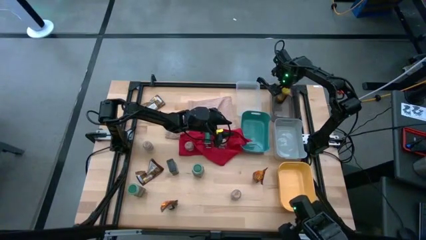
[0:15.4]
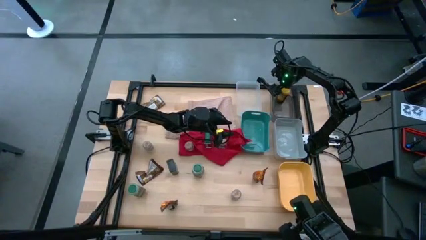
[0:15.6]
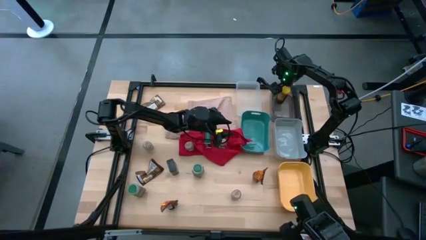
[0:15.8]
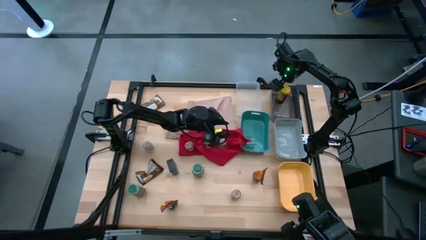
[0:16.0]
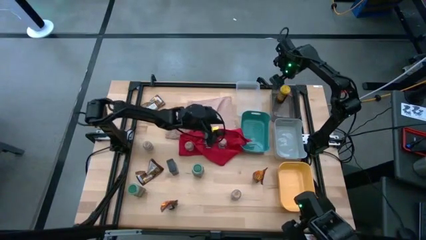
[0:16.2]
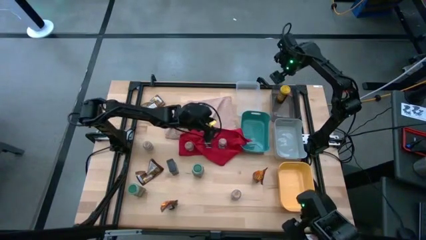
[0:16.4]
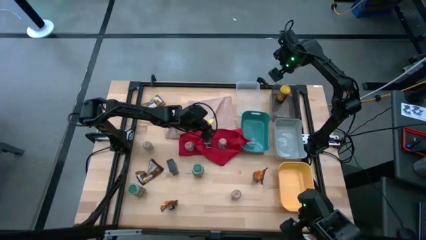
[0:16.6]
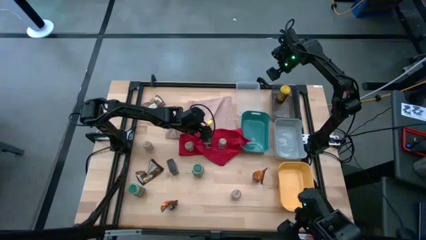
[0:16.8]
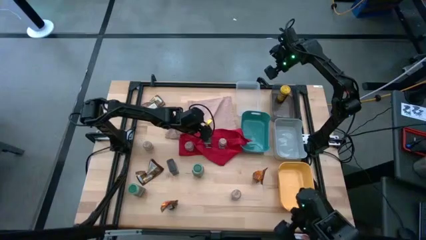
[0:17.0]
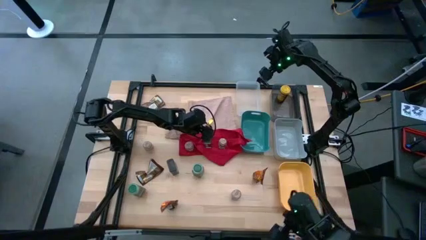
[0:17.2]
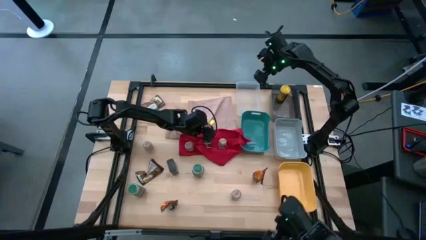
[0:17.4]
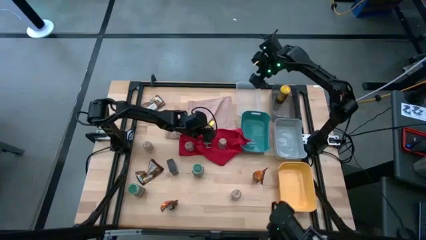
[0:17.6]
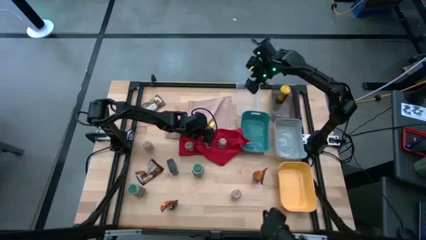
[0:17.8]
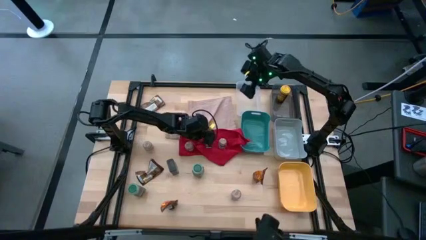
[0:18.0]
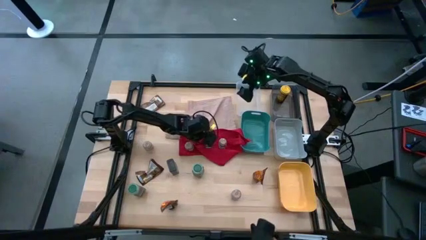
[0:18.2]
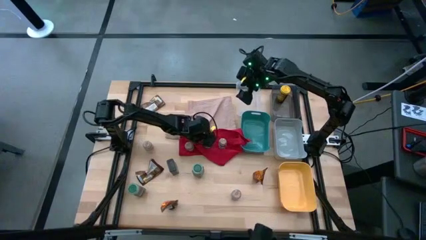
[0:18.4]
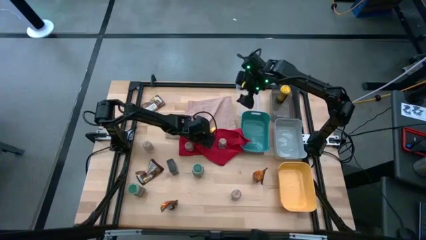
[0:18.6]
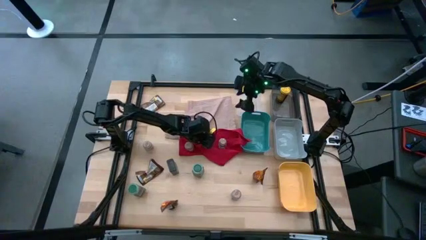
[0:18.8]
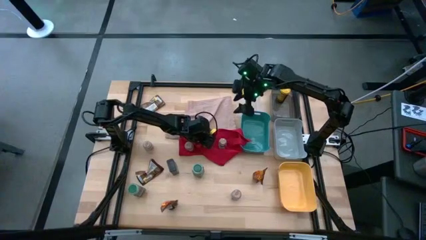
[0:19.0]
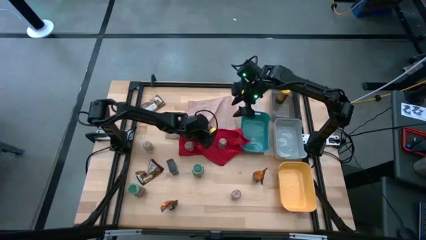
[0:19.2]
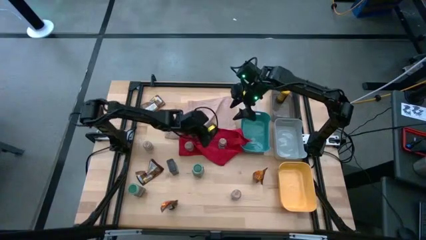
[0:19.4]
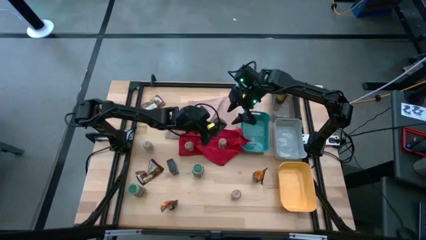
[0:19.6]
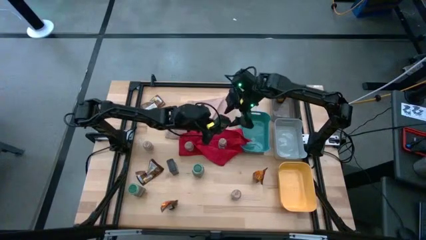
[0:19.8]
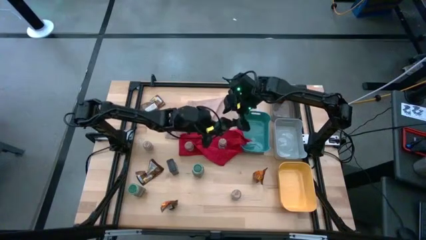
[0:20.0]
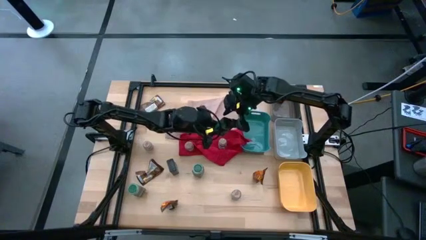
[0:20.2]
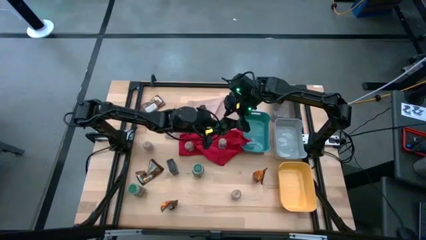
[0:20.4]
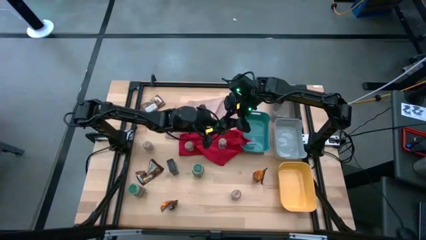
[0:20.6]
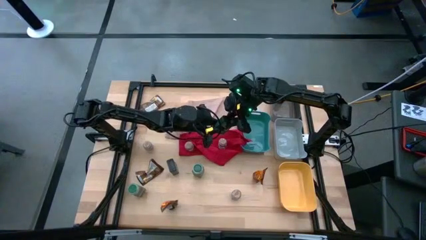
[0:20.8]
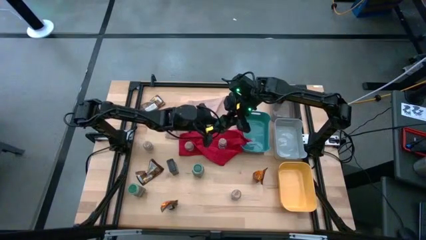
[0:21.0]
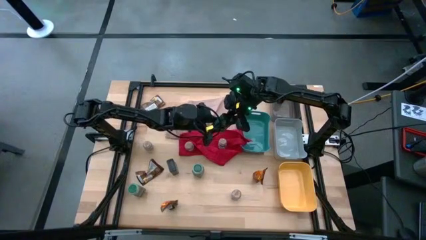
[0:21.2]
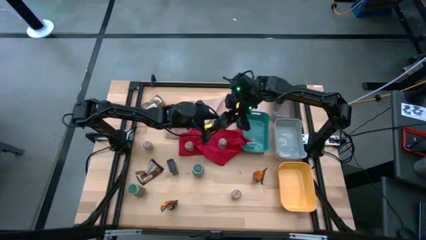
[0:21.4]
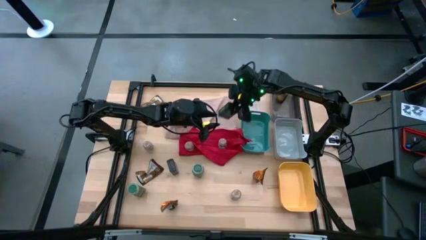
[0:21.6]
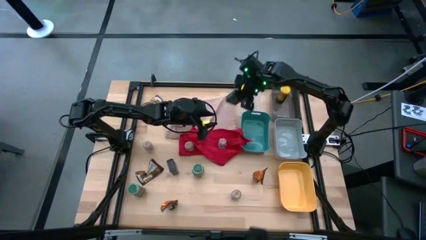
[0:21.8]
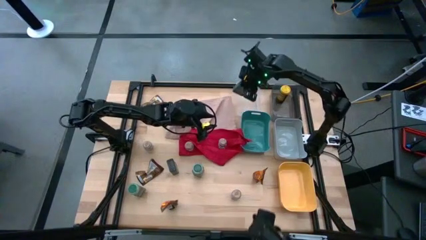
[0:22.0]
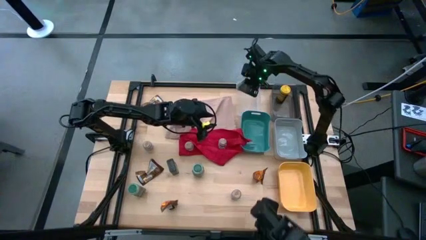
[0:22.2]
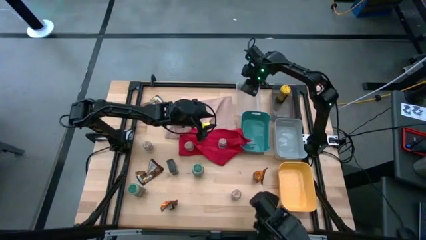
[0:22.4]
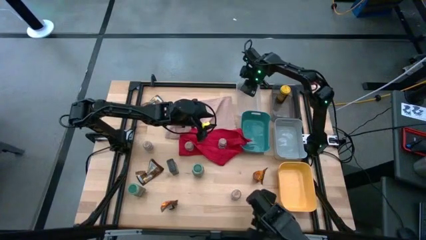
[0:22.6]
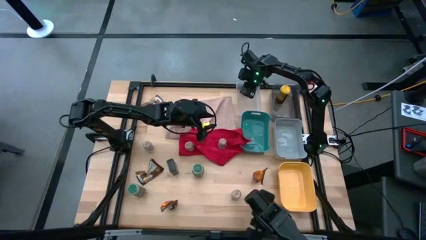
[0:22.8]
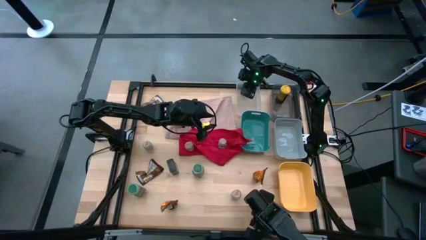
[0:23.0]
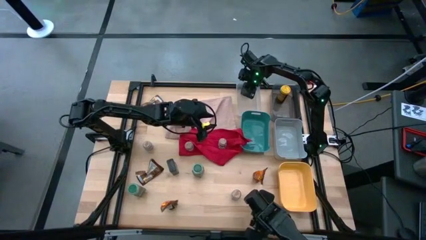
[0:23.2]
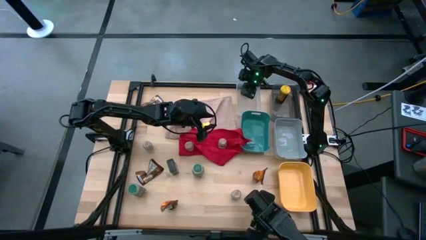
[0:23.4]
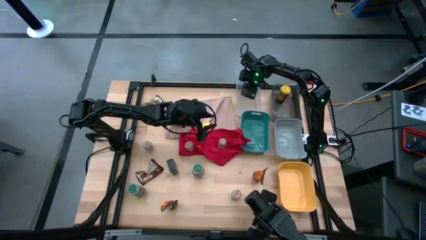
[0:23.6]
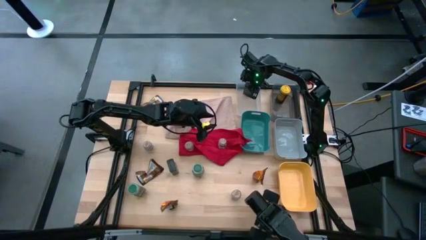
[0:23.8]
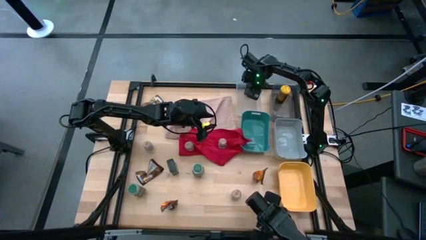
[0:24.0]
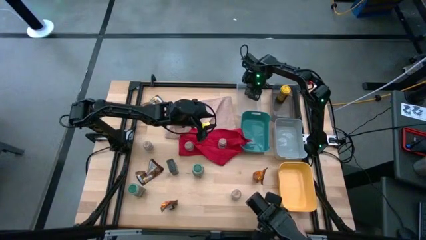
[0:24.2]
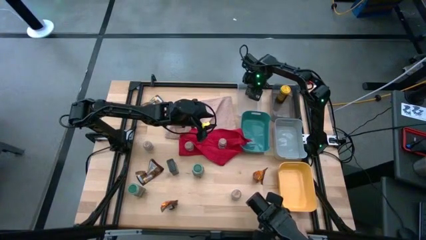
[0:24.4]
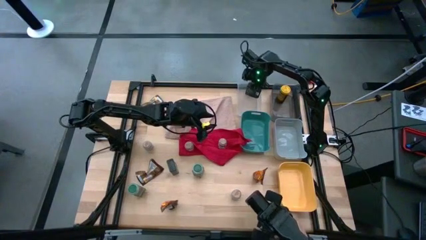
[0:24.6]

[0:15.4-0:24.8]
Task: Sort spices by type
Put the top dark green seasoning can into the transparent bin

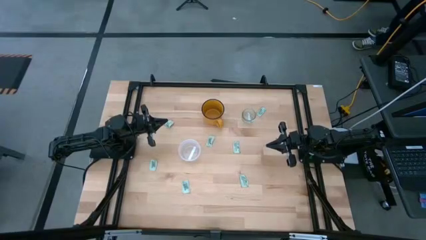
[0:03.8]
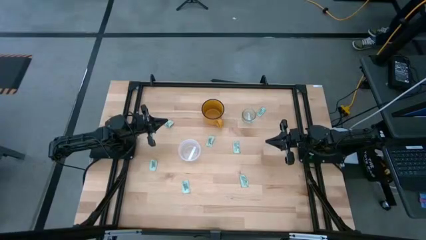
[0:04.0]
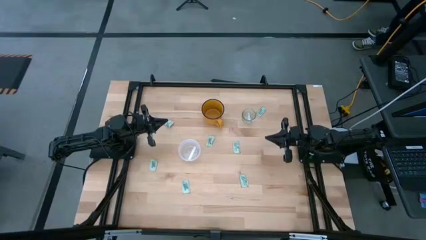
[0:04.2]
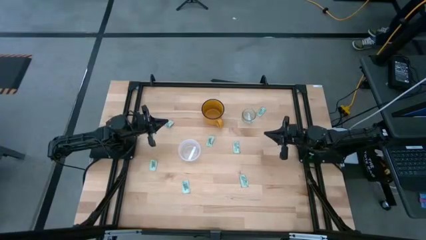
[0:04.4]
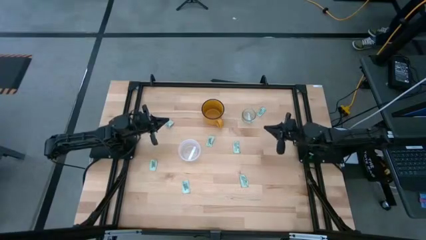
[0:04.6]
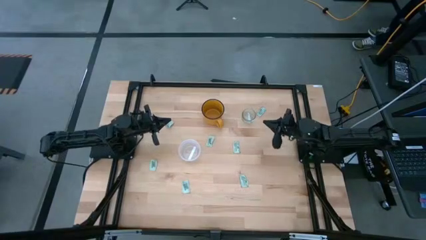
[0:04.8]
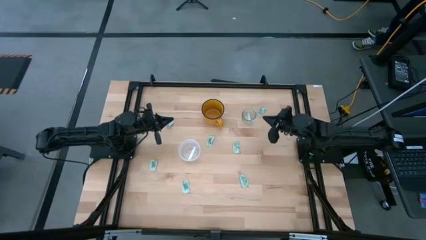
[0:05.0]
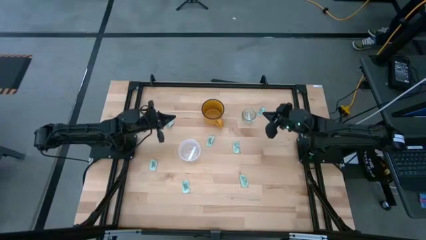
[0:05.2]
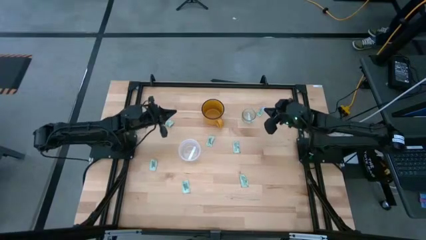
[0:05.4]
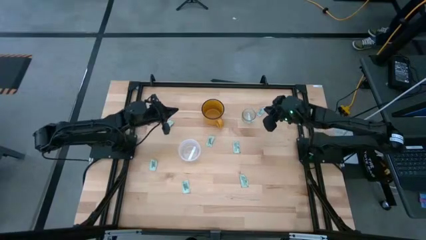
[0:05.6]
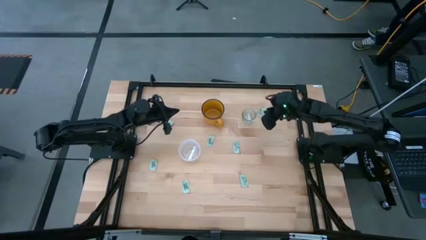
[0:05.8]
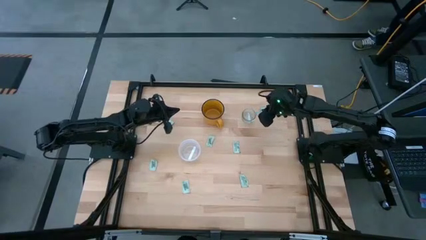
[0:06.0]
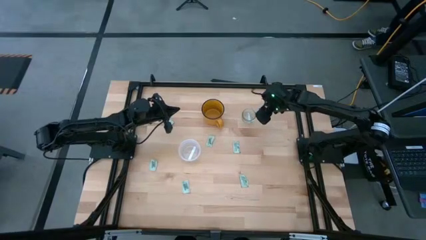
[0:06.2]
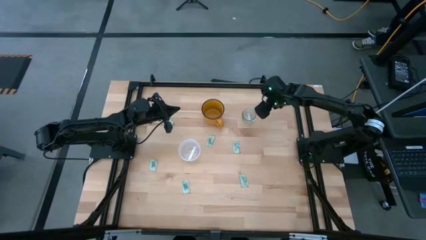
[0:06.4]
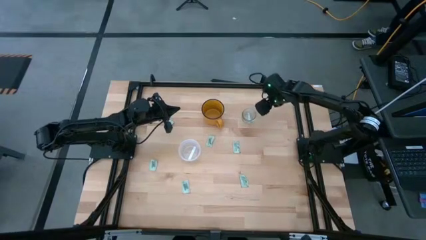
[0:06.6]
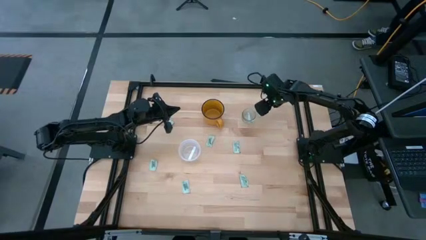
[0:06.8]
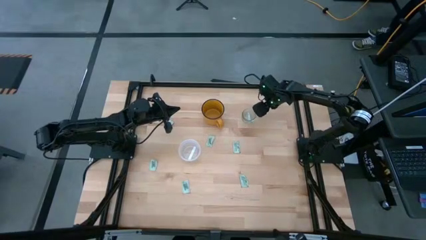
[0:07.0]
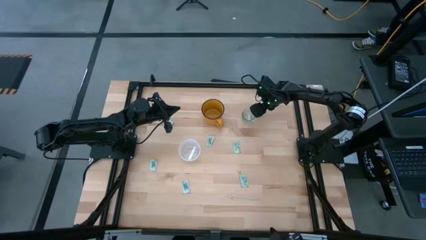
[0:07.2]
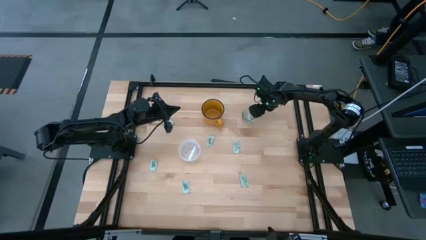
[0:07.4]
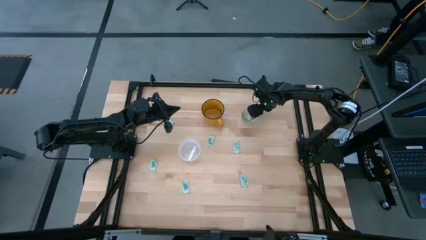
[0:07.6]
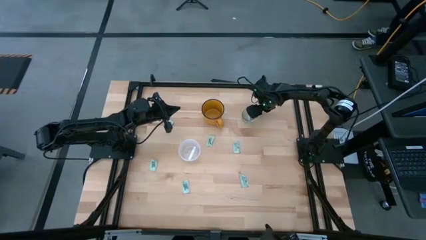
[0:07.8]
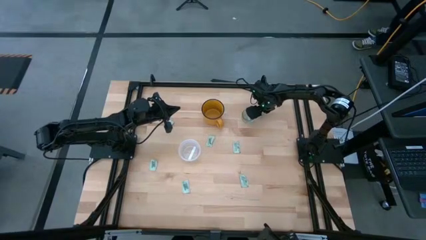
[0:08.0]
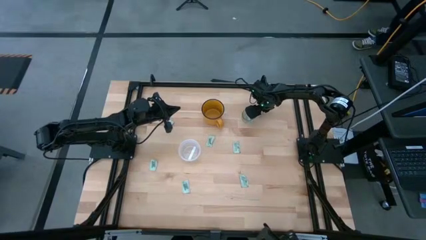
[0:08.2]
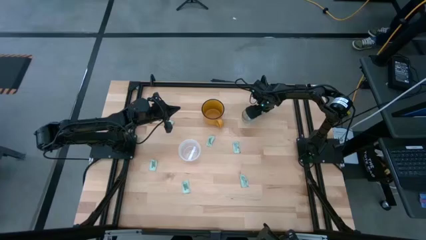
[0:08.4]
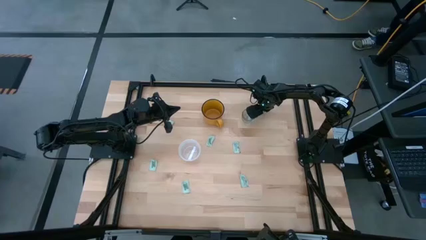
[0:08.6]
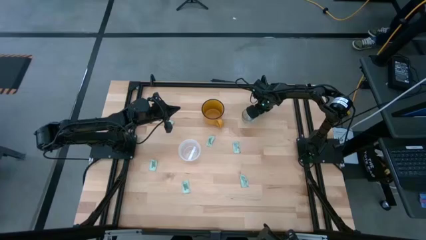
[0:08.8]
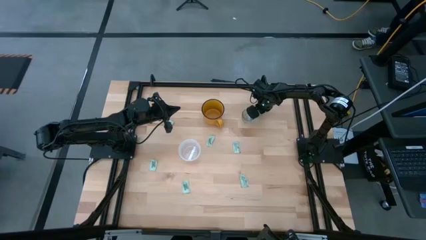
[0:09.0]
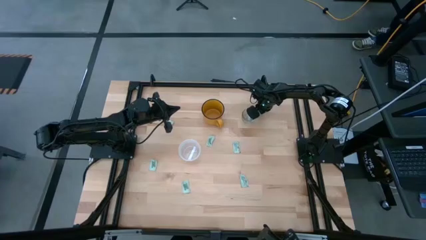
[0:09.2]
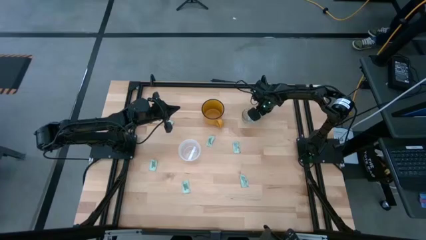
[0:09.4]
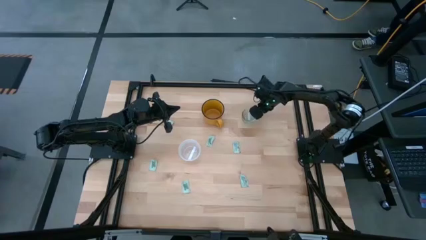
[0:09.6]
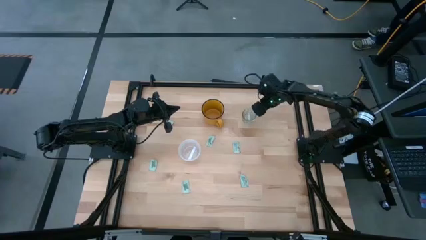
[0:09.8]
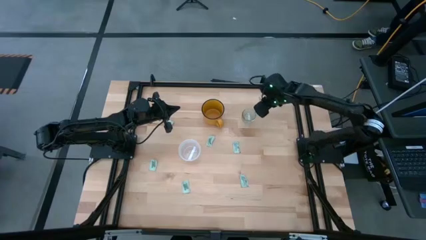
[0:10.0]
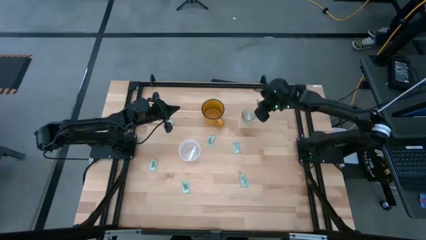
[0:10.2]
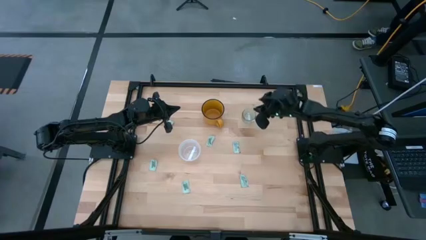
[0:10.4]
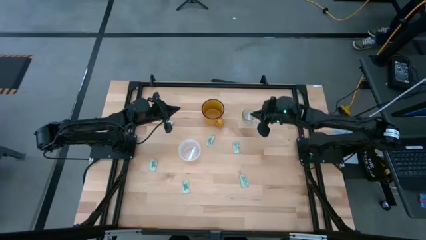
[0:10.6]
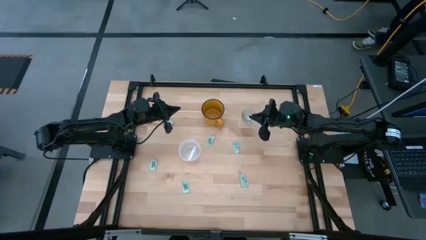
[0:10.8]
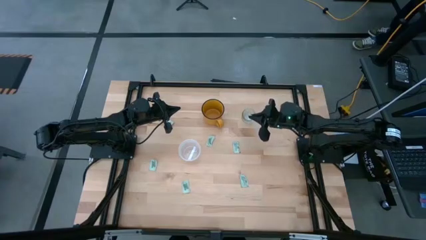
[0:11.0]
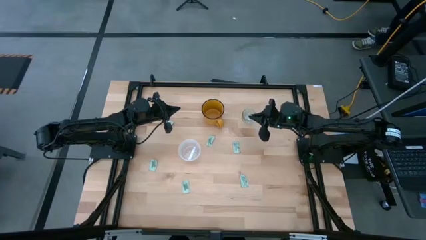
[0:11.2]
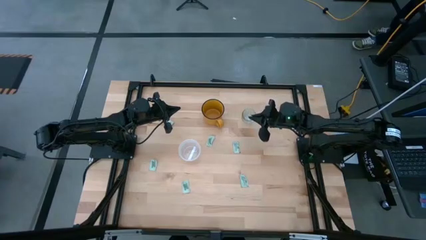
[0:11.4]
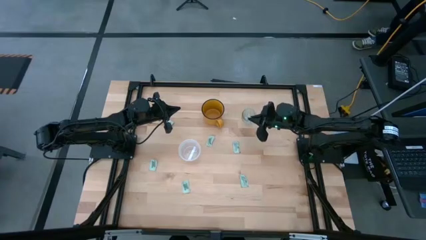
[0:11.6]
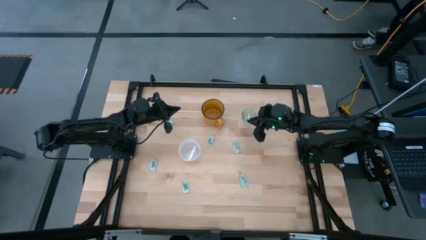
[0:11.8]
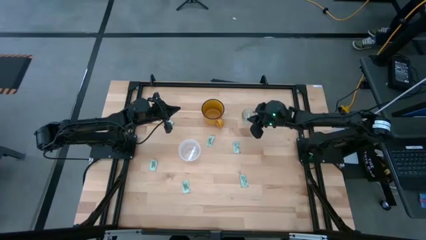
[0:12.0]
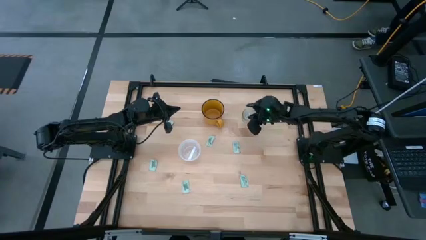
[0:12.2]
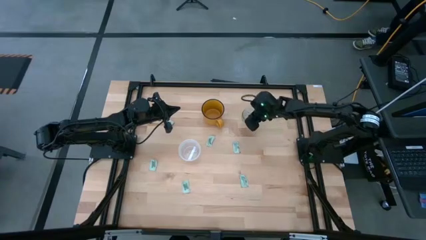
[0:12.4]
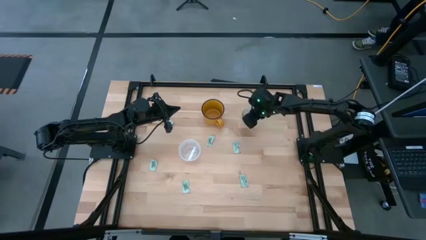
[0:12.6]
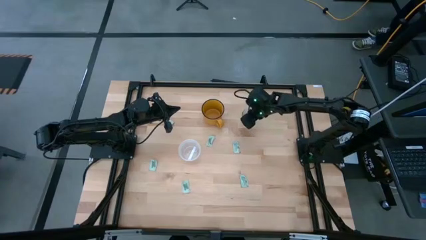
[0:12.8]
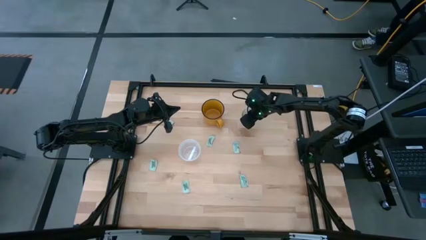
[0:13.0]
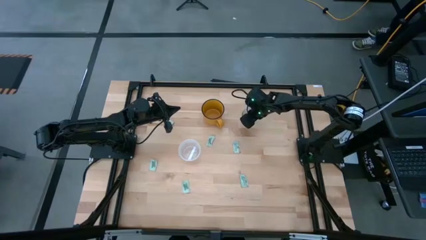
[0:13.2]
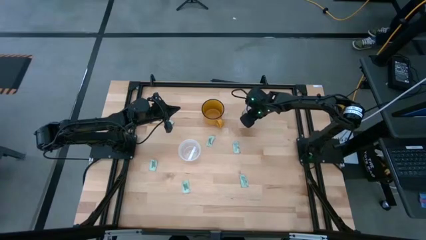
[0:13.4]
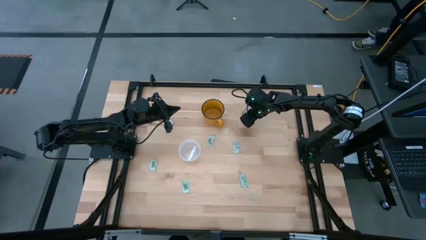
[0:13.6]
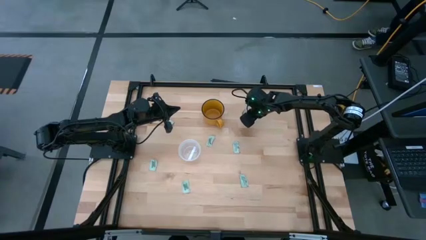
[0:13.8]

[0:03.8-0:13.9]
Task: Pick and place Stevia / Truvia into bins
Put the stevia packet into the transparent container
